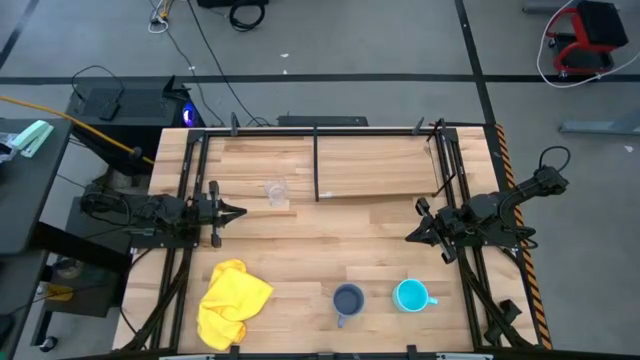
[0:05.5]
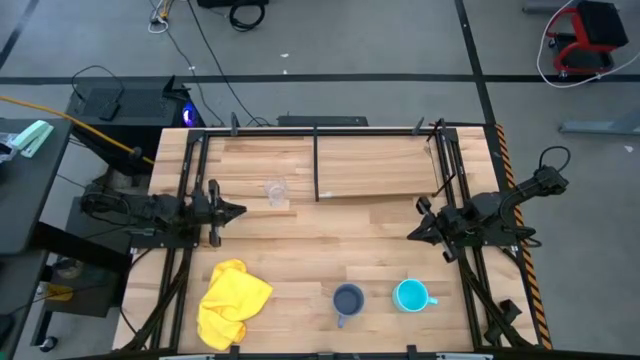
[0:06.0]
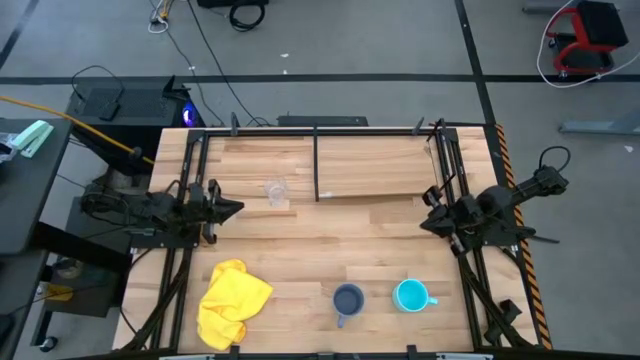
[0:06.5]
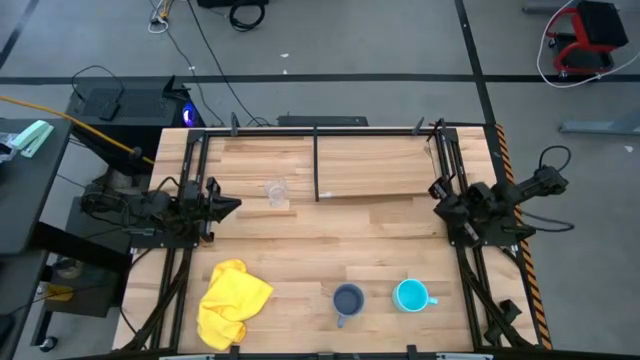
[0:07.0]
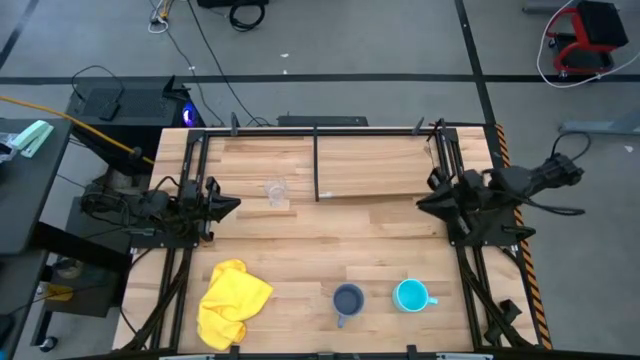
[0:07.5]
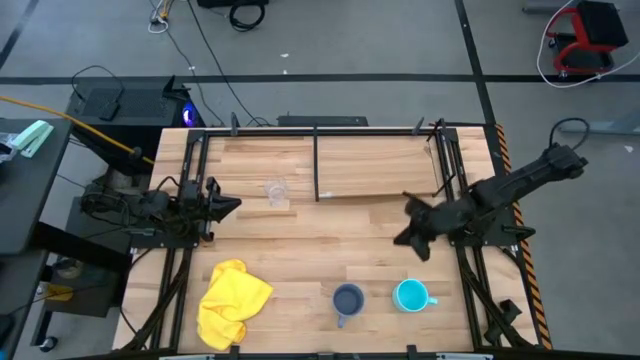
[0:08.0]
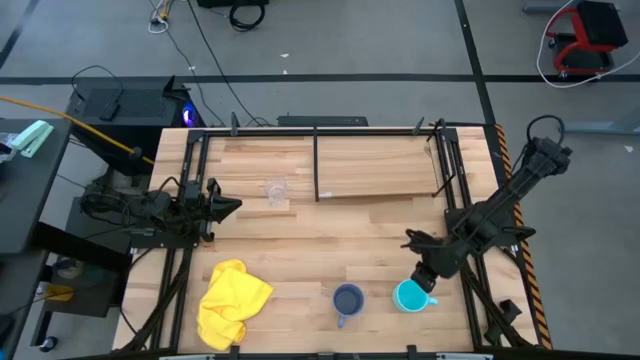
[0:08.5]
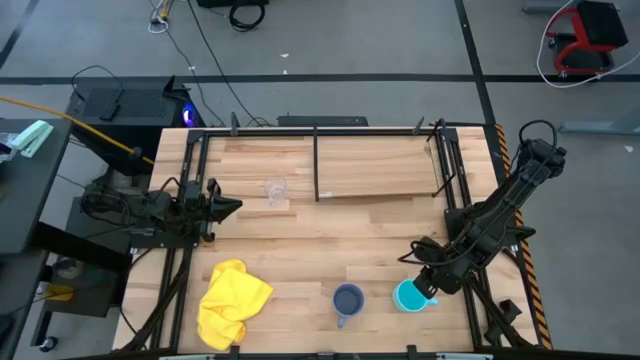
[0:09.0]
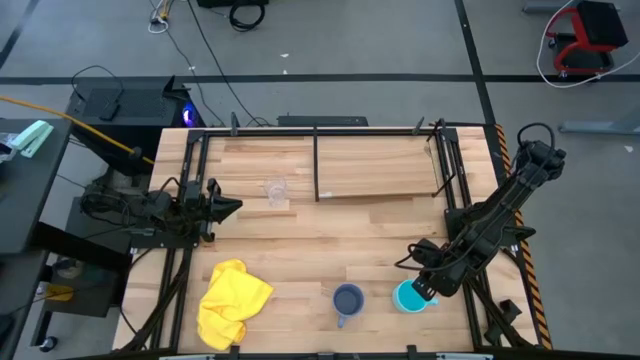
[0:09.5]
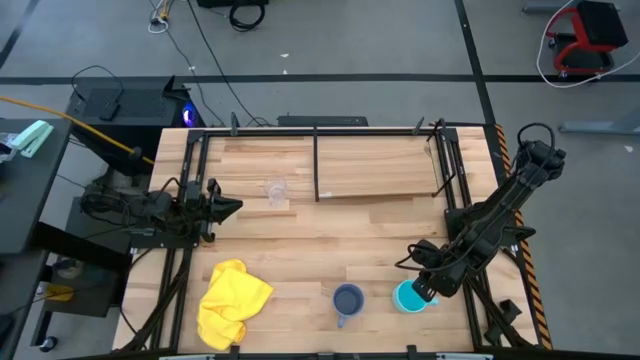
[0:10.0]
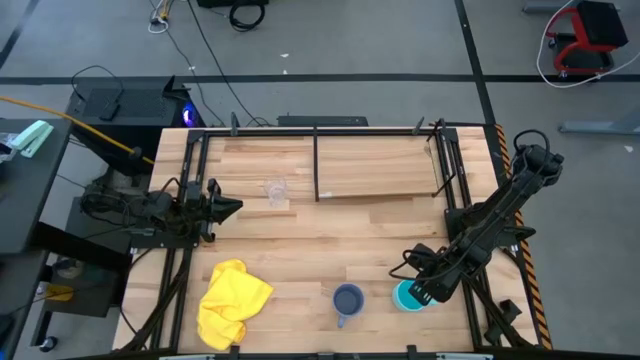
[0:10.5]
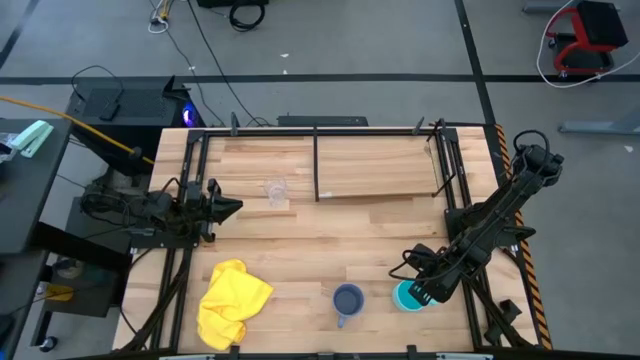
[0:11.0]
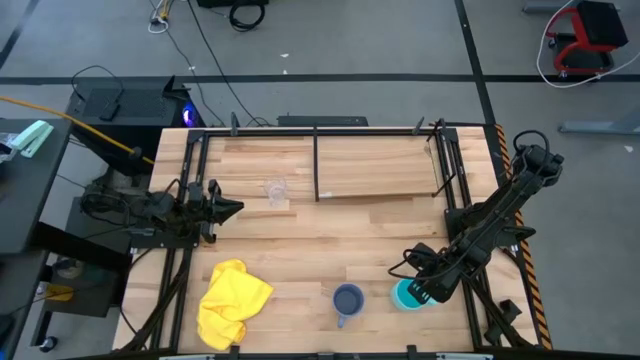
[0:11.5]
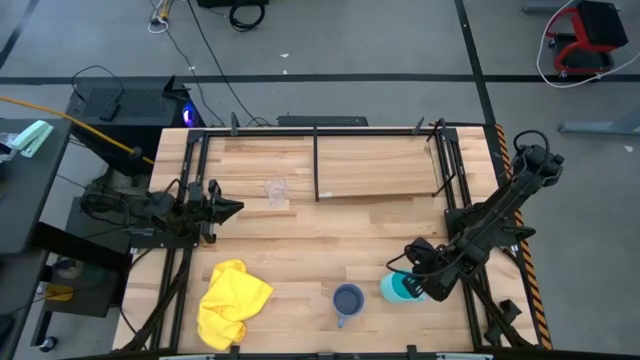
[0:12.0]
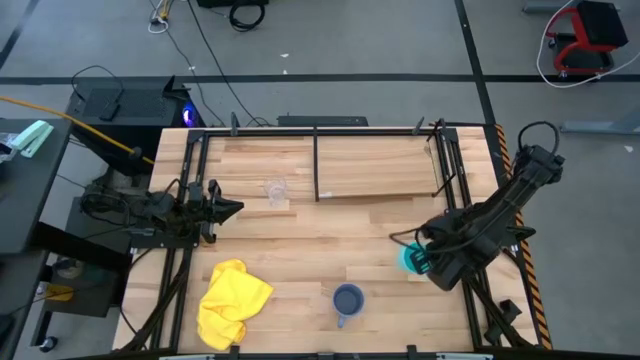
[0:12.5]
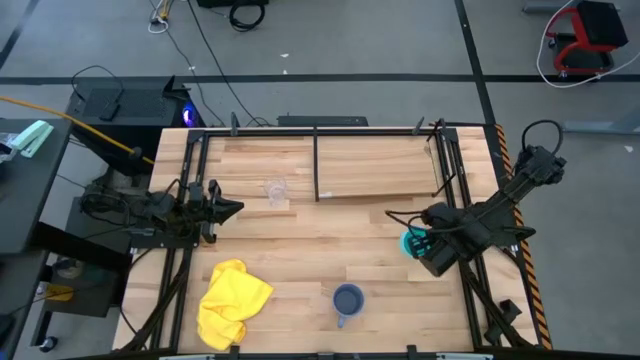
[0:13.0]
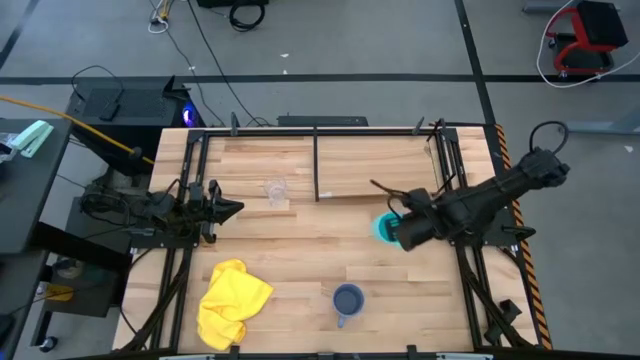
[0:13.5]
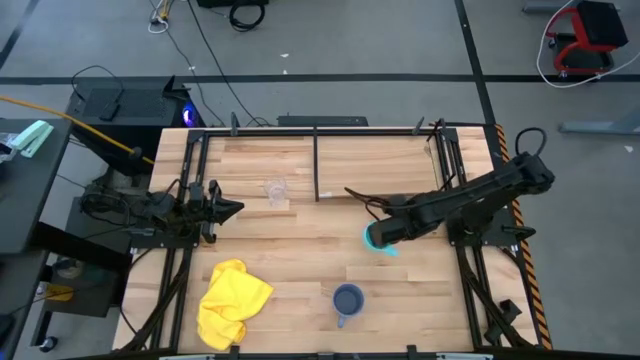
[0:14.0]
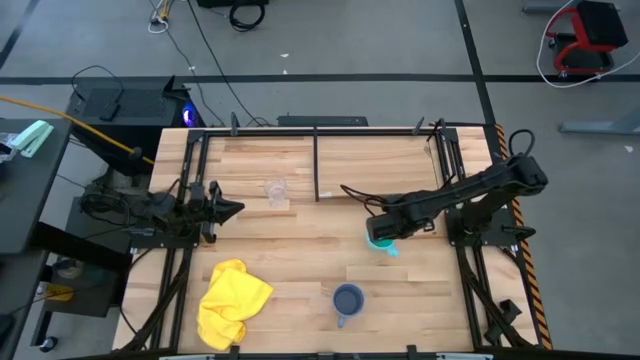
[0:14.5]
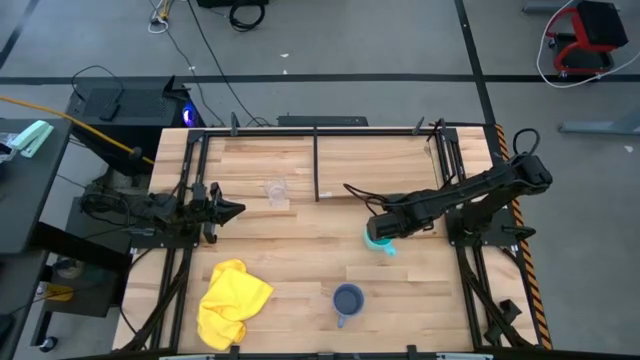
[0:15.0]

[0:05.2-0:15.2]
Task: Stack small to large cups/mugs on shelf
Move the light blue mug to the middle right of the table

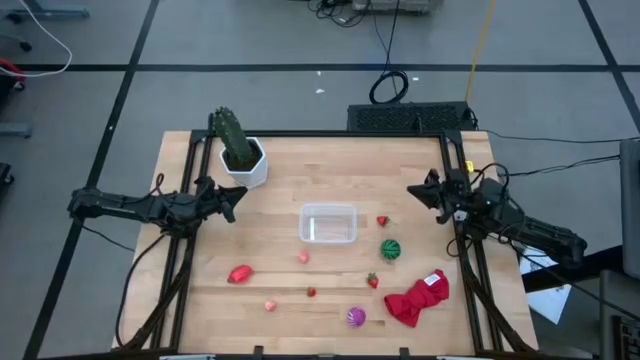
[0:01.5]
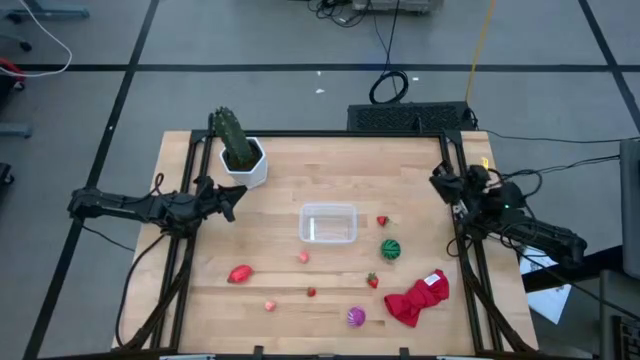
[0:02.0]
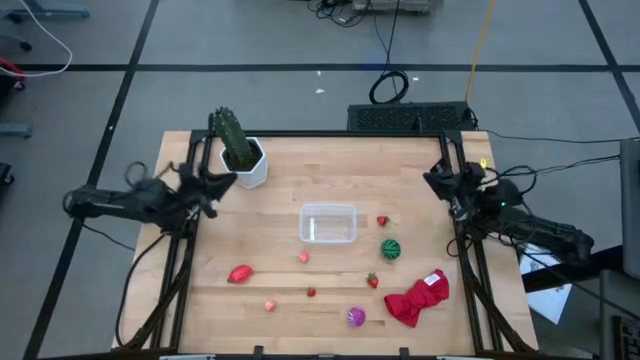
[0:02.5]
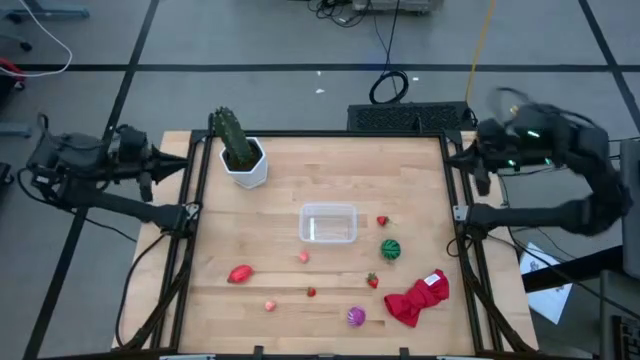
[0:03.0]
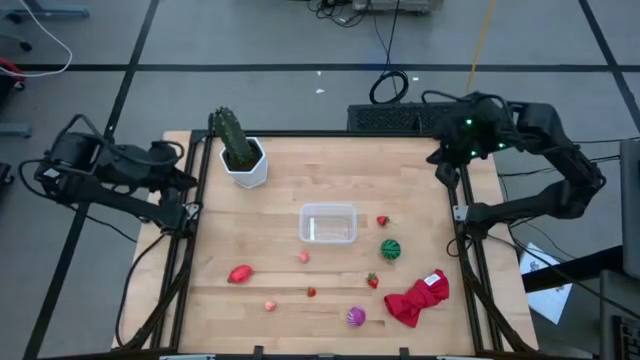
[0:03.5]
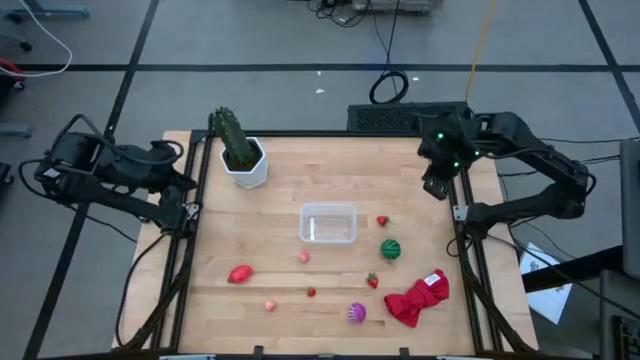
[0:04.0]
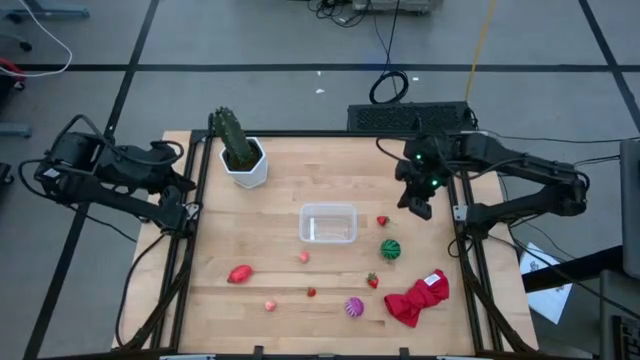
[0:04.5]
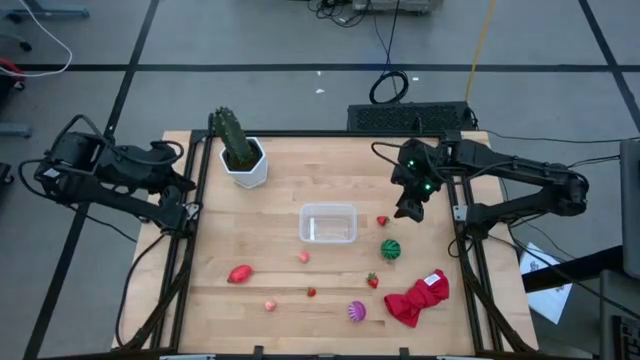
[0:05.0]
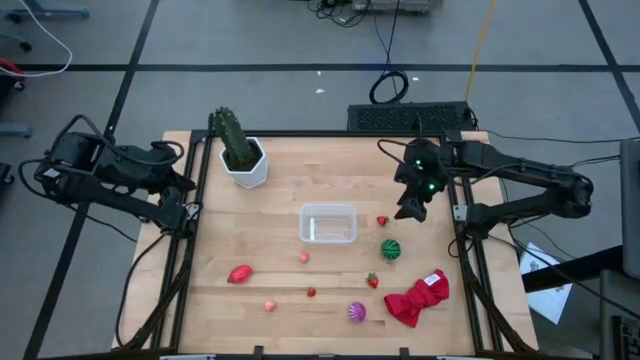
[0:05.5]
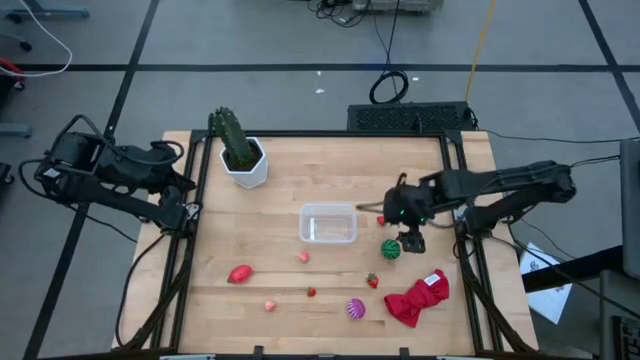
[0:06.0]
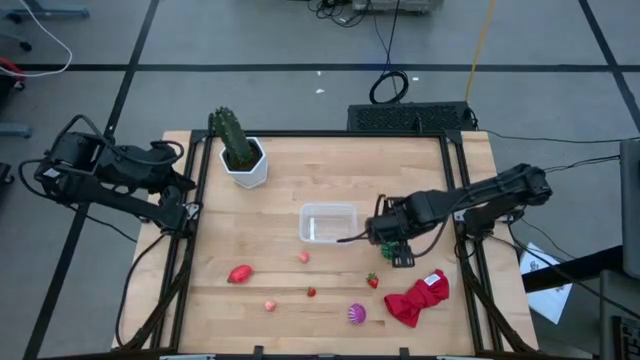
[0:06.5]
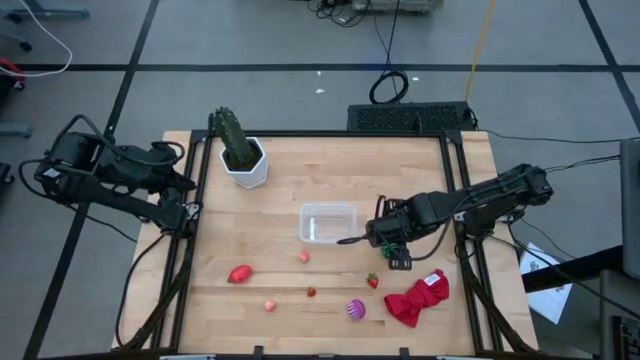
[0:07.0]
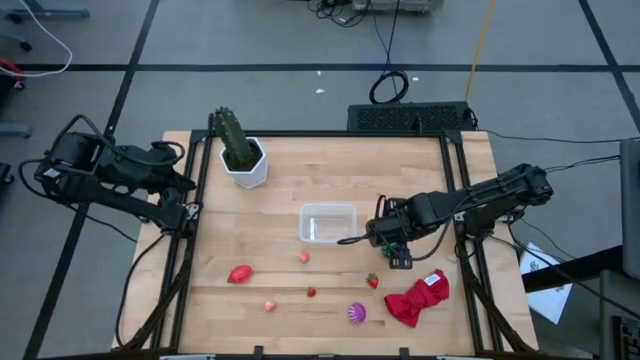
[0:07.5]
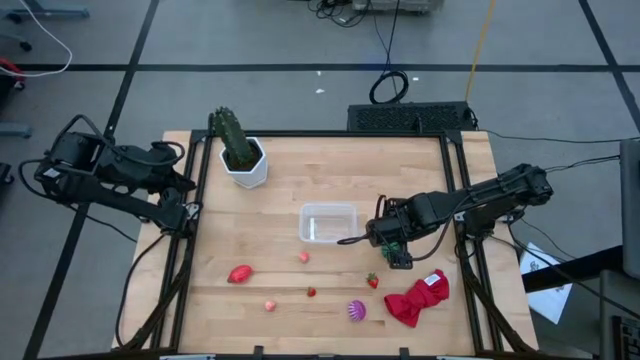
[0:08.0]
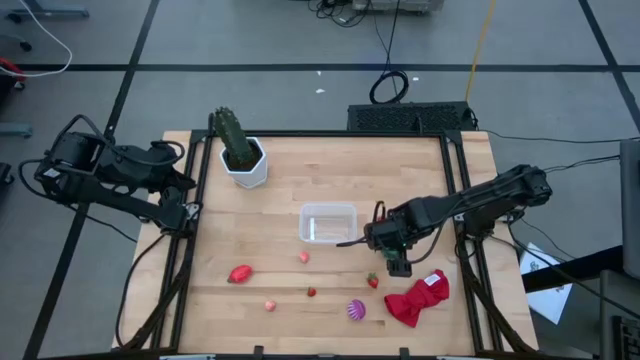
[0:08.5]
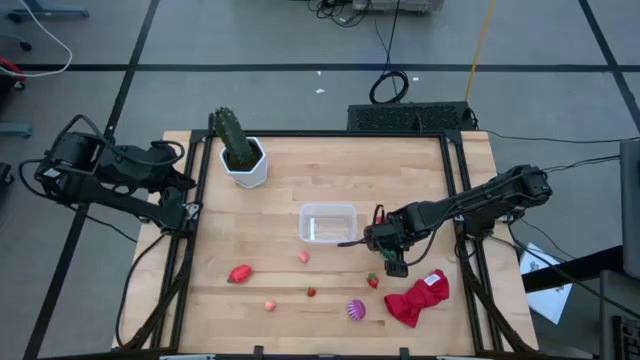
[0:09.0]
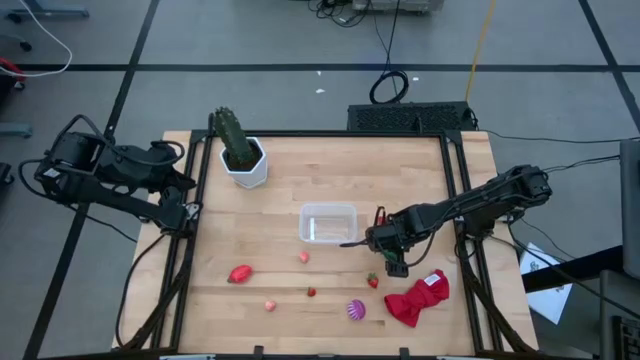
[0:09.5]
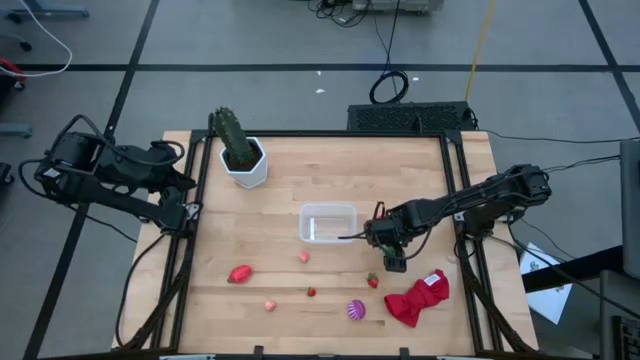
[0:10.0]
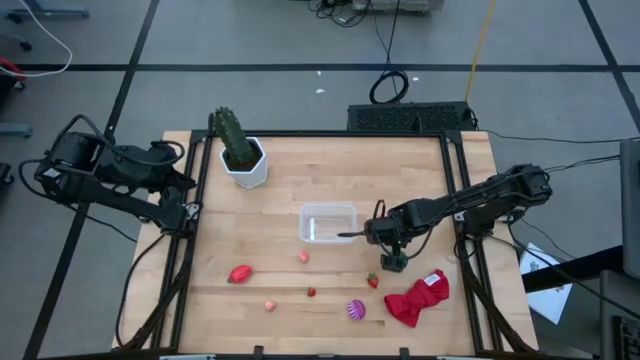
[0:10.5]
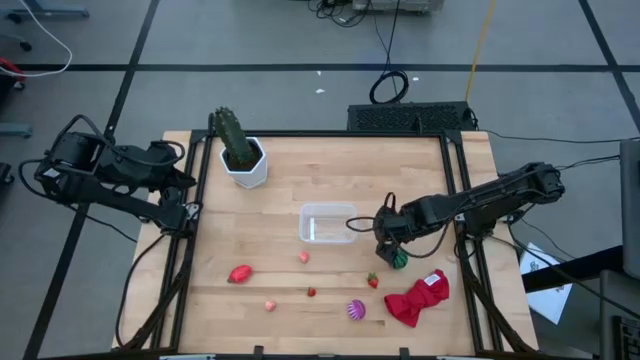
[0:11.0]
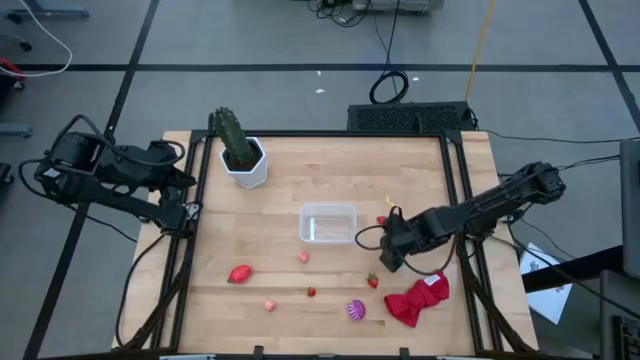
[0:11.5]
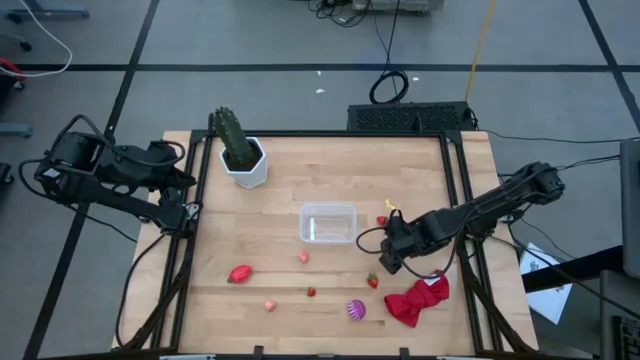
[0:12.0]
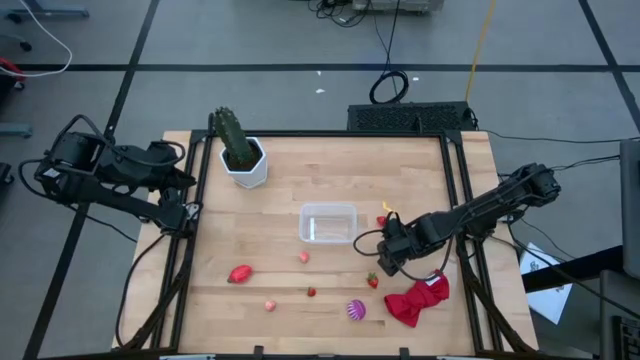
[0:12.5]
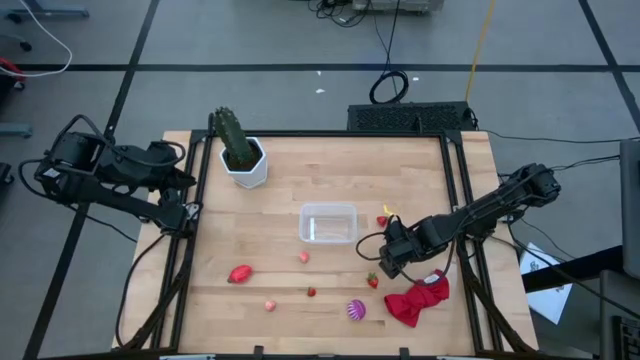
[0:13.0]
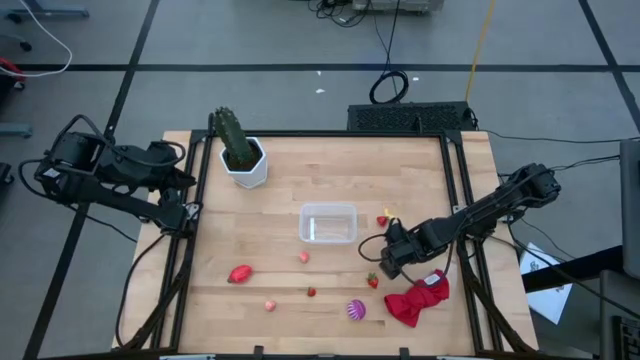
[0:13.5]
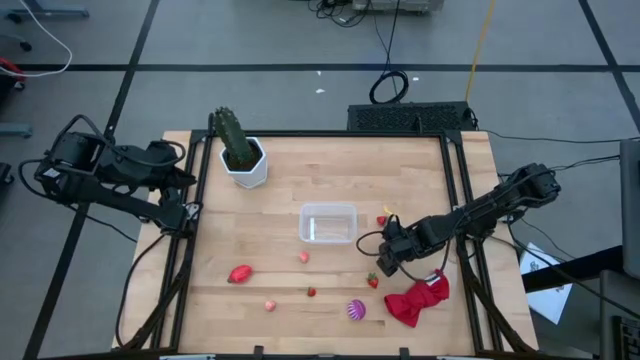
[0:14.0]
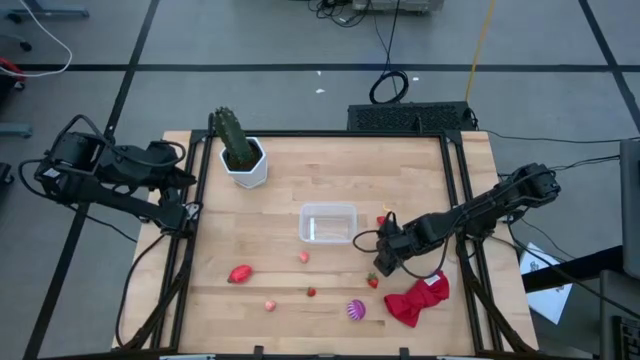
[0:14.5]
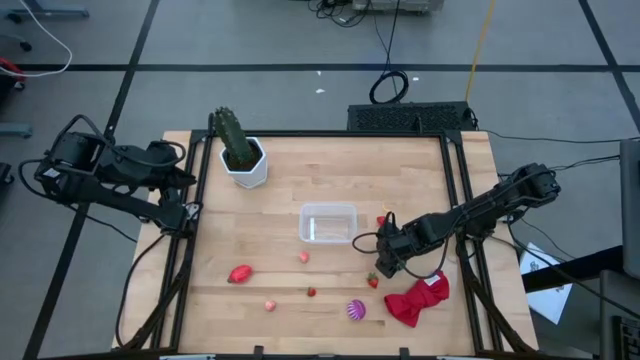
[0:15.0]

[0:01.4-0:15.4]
Task: Pick and placing Produce into tupperware
Put the watermelon into the transparent bin
